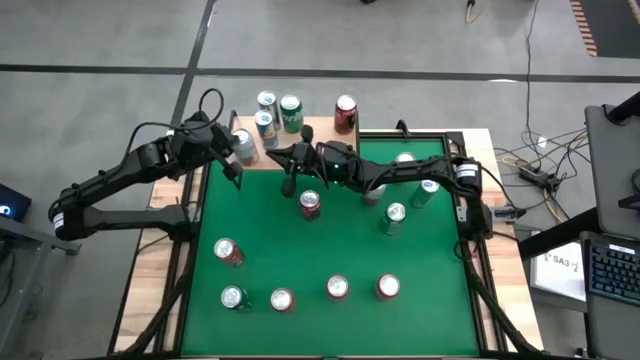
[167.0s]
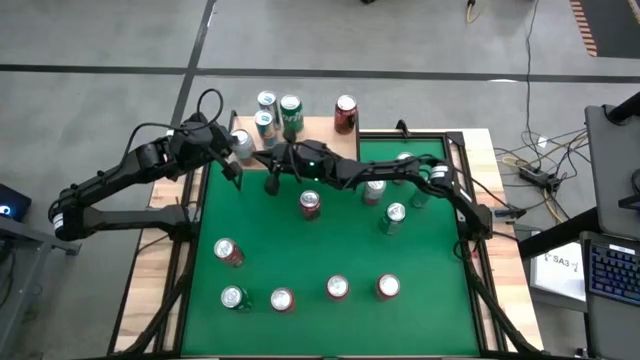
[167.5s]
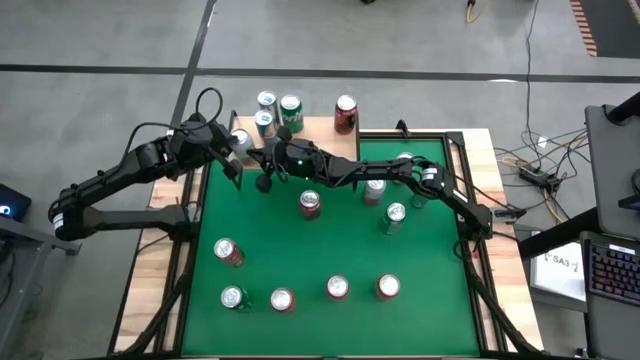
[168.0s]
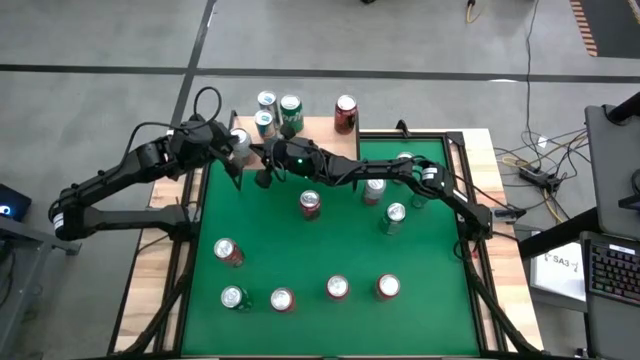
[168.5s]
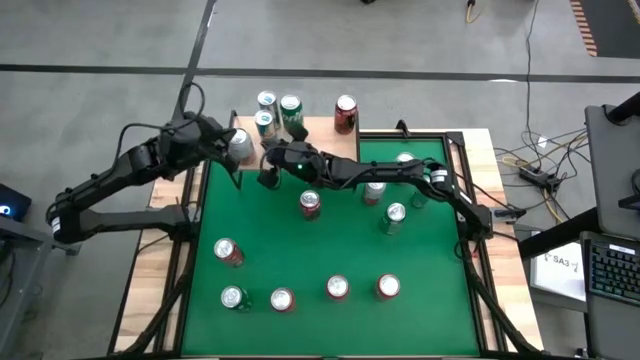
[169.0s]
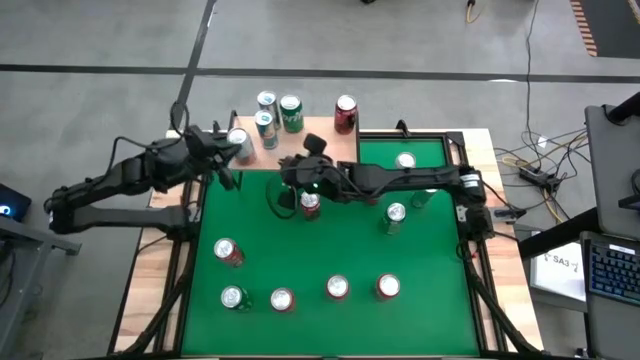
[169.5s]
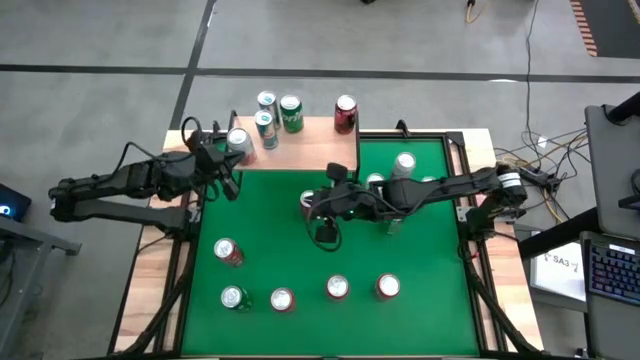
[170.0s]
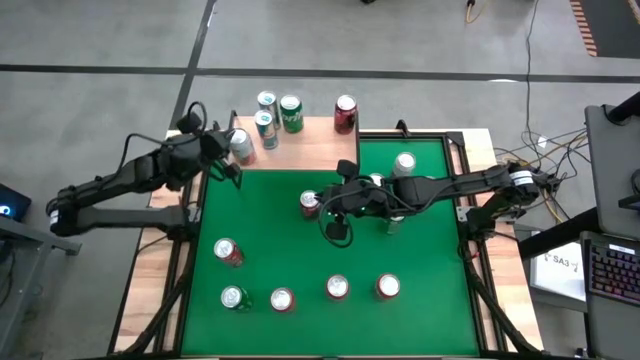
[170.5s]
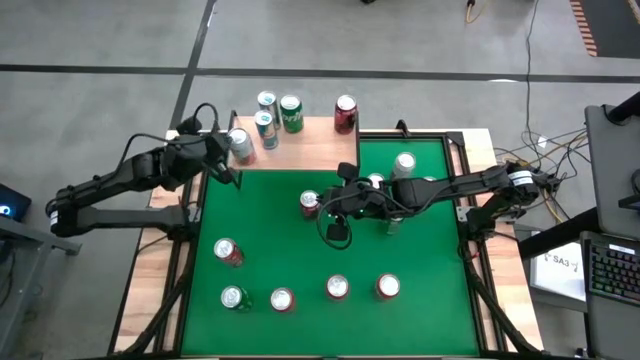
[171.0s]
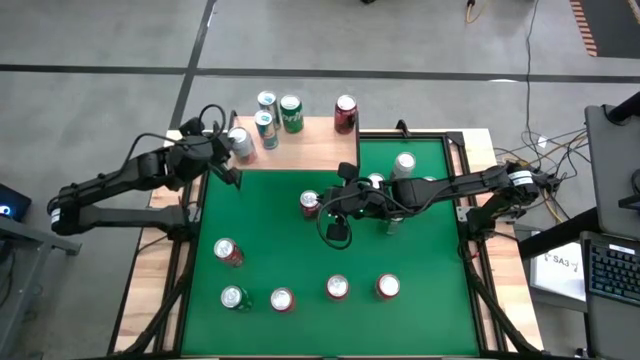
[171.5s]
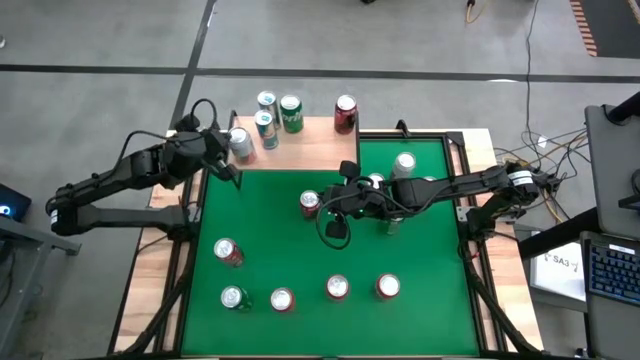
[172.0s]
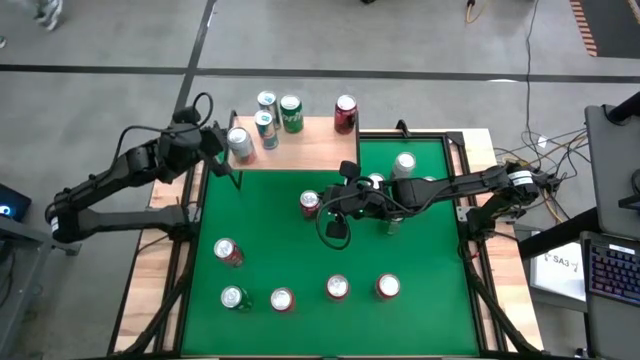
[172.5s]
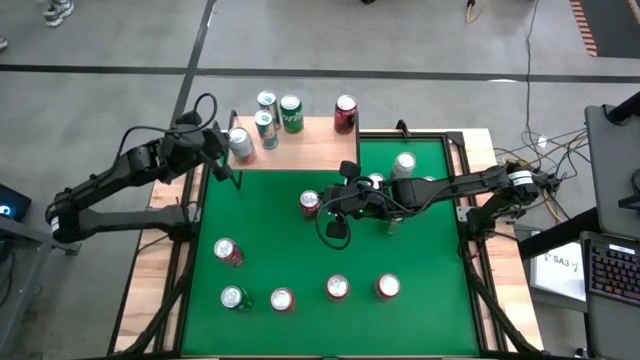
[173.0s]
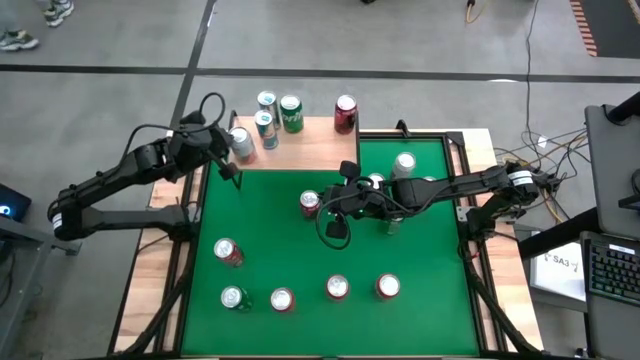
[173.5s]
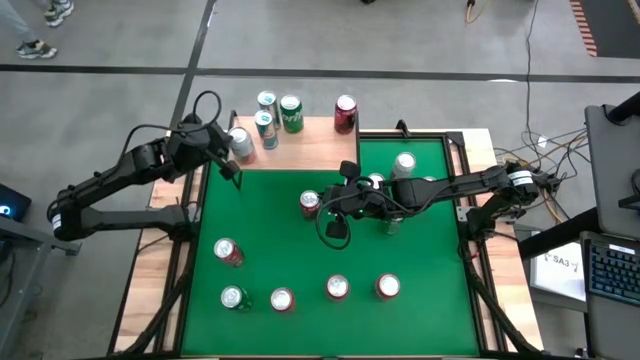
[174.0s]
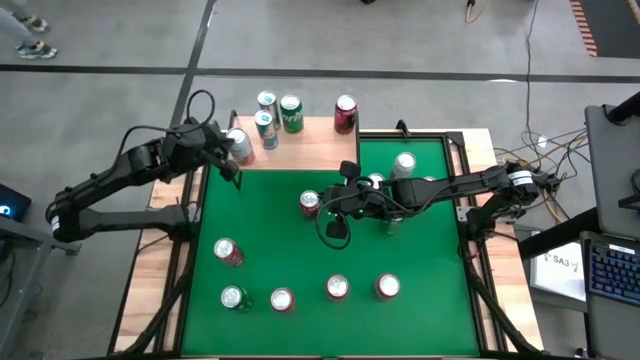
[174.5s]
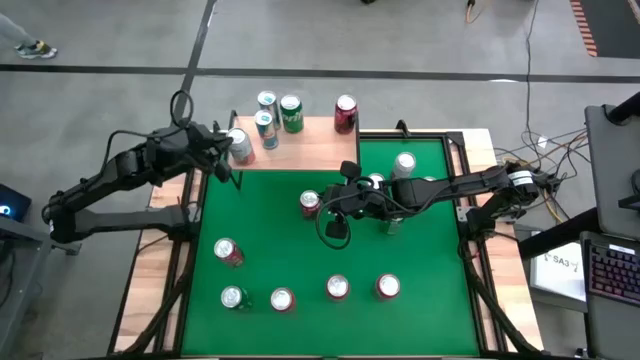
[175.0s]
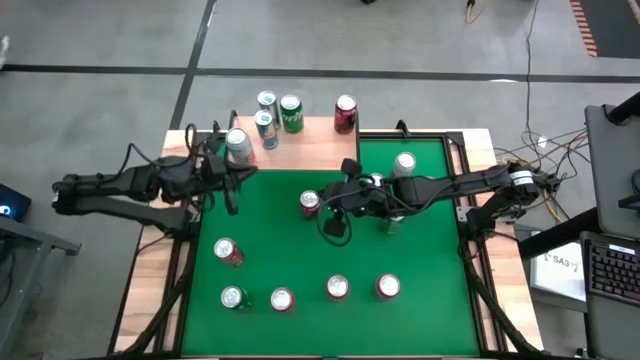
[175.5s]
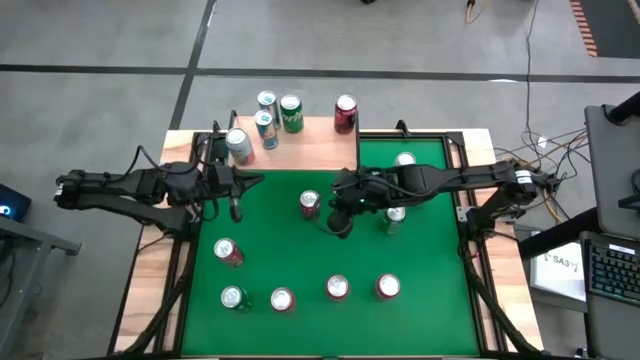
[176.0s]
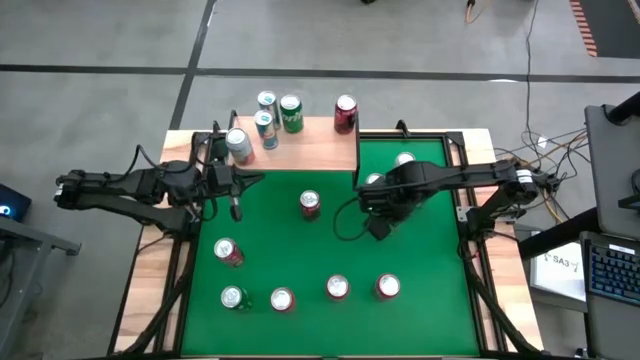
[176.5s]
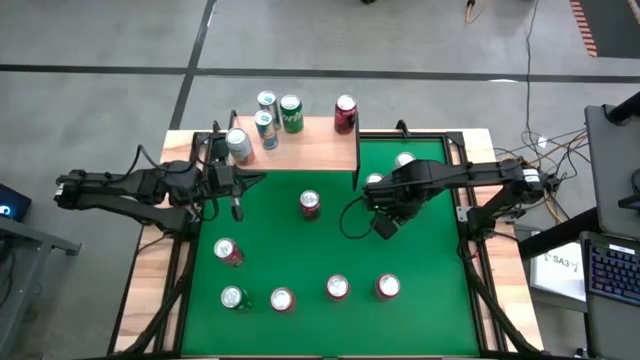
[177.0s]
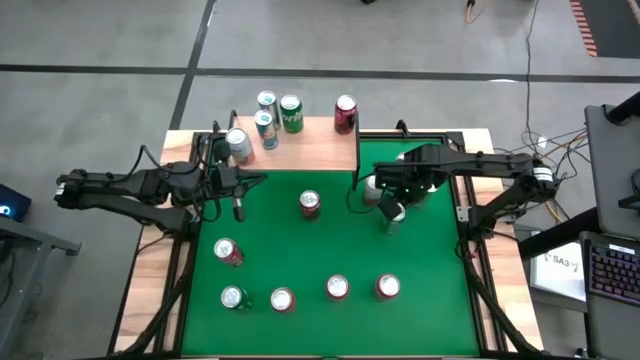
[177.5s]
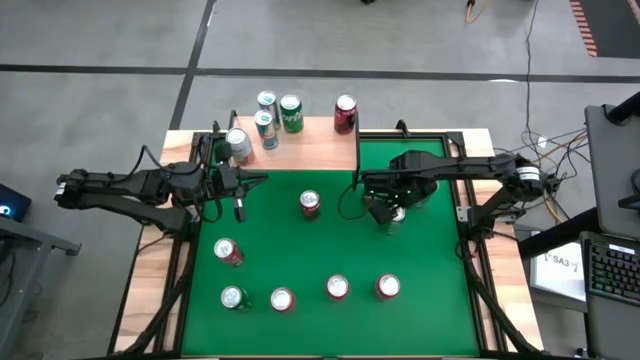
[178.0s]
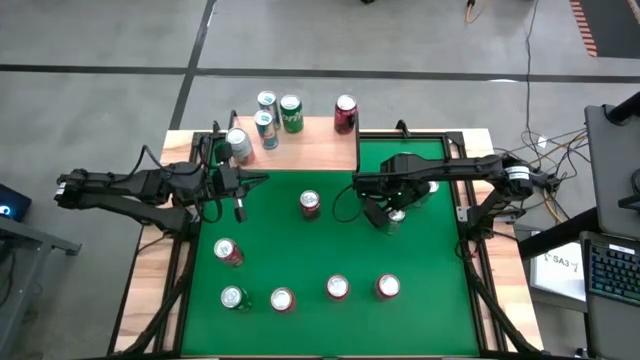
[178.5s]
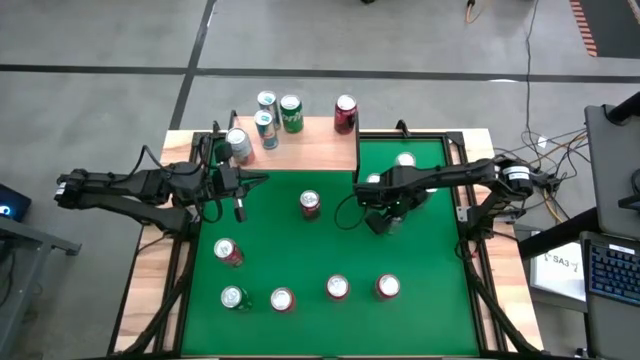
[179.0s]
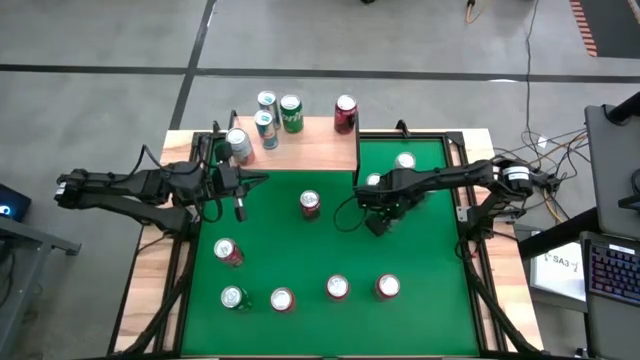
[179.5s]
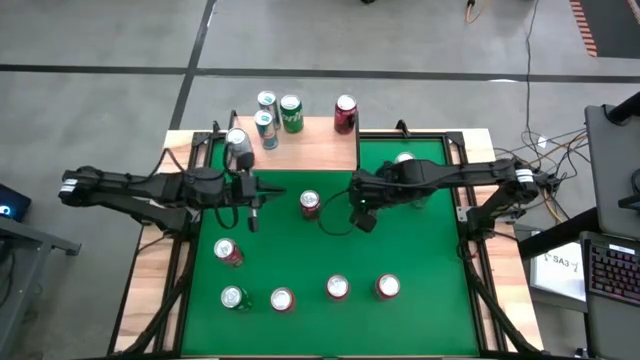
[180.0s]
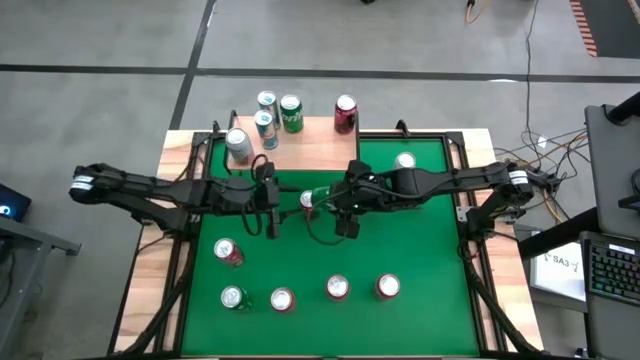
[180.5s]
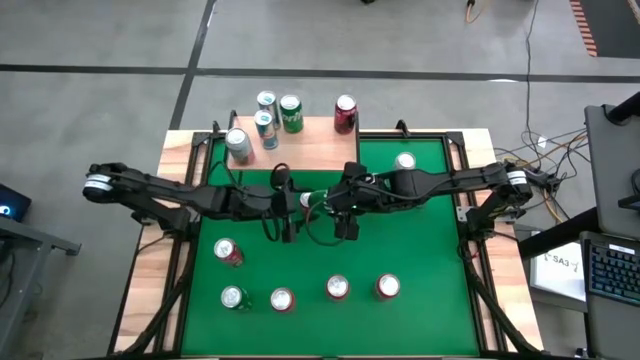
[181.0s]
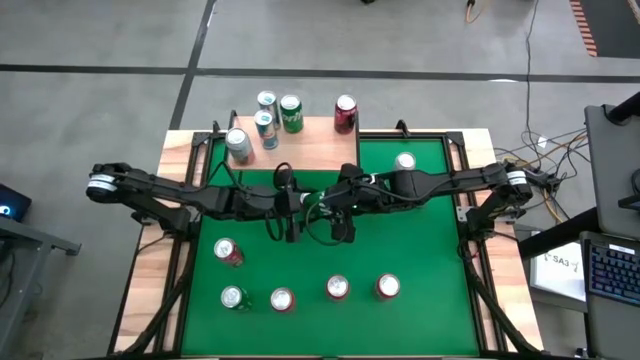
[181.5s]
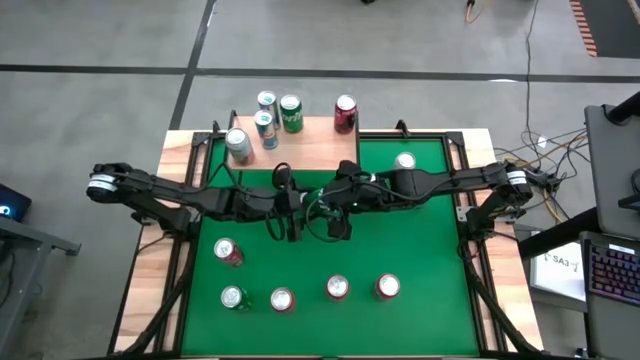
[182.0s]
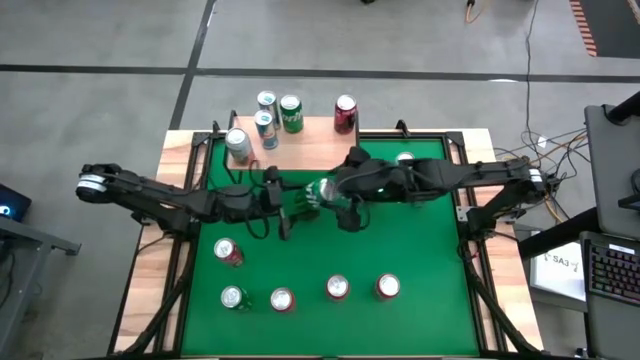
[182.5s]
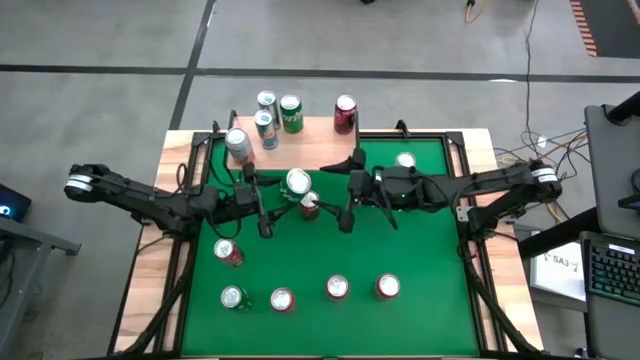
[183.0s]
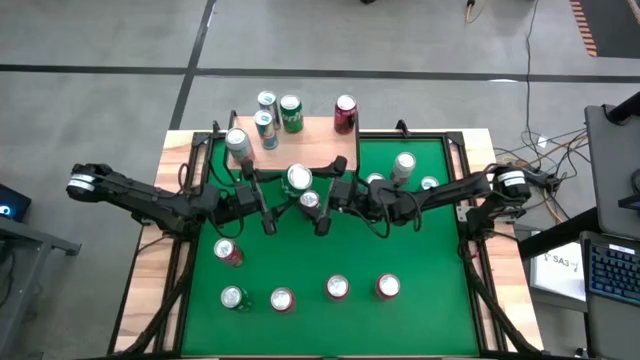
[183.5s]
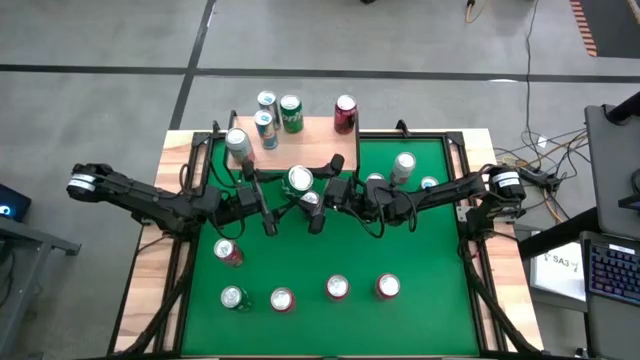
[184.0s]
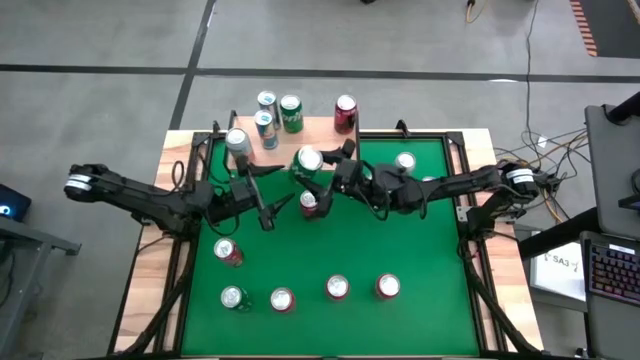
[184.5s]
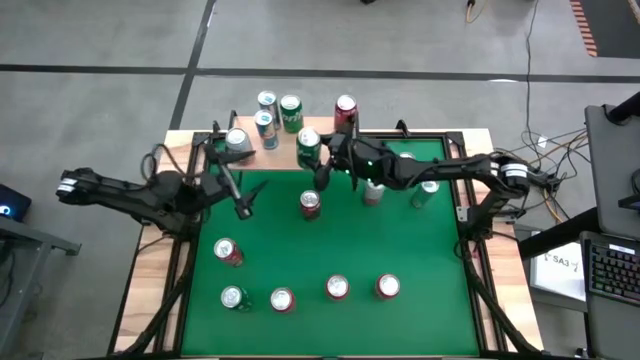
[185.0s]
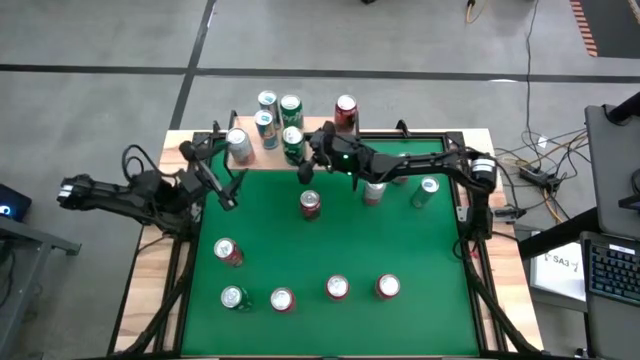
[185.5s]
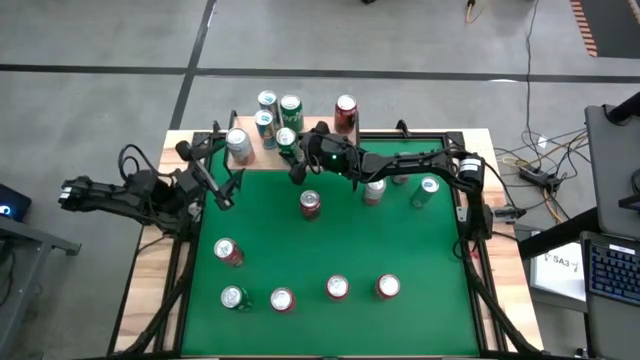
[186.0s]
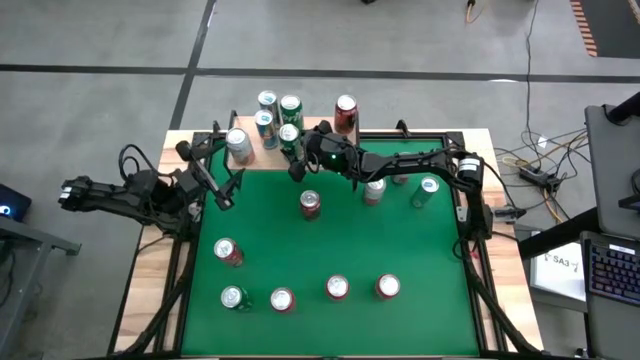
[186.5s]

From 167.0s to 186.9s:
Task: Place canned beverage on shelf
Put the green can on the shelf
